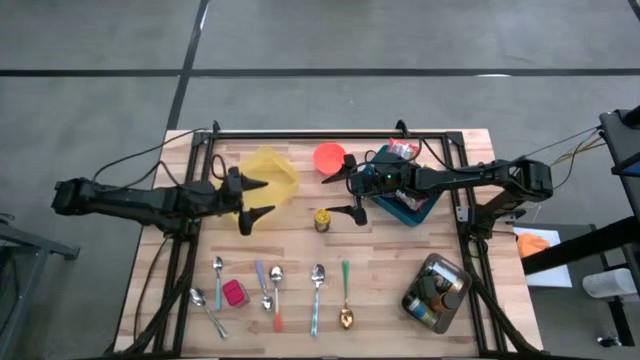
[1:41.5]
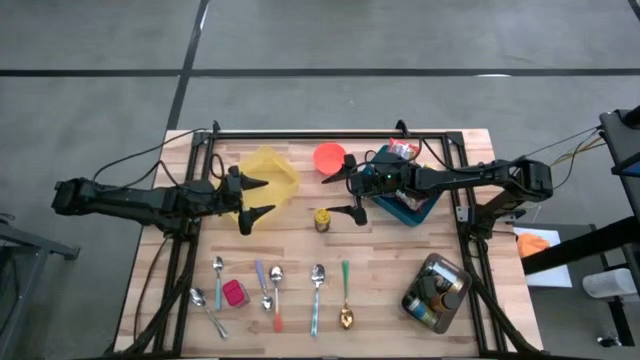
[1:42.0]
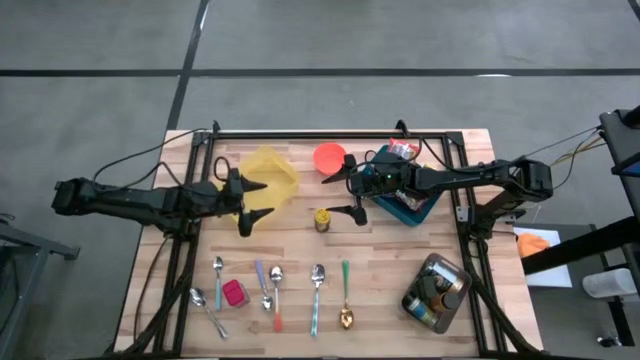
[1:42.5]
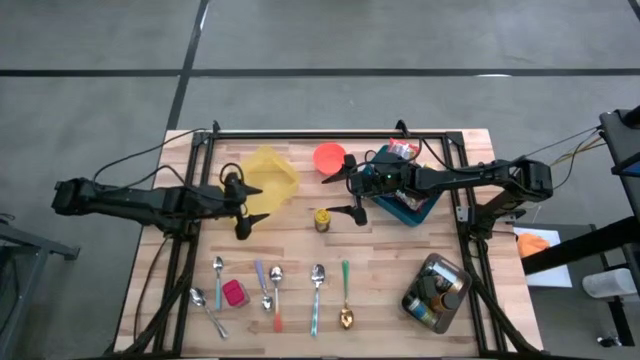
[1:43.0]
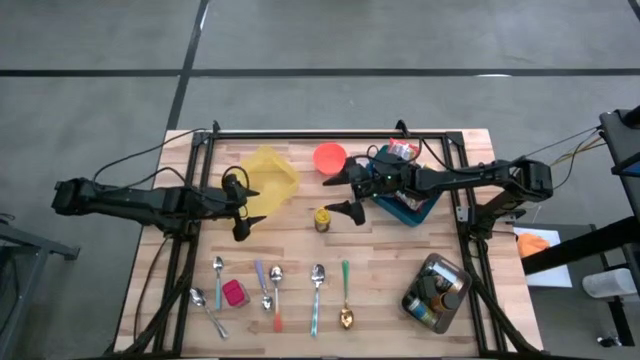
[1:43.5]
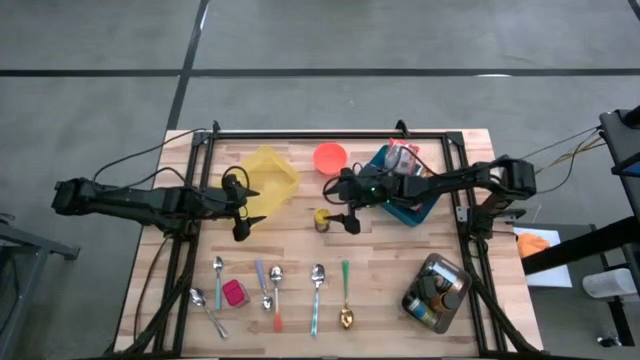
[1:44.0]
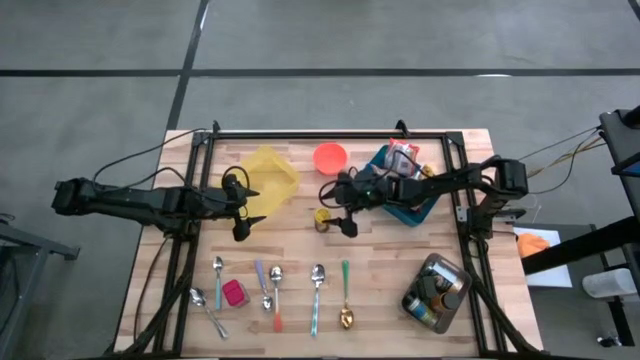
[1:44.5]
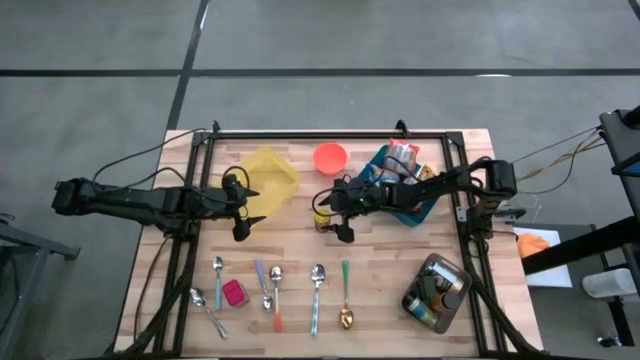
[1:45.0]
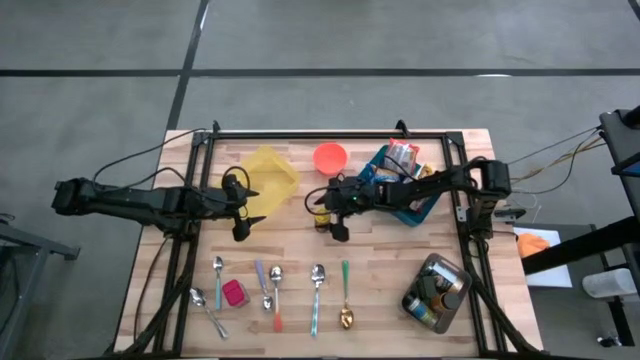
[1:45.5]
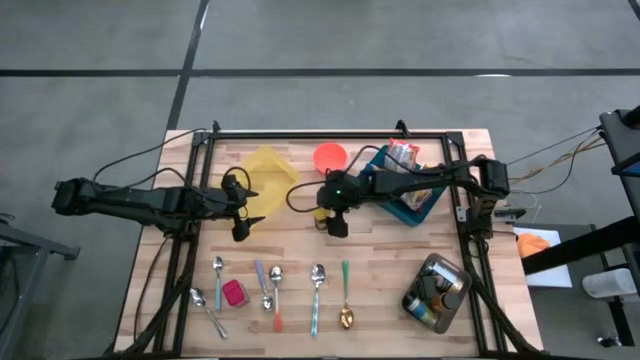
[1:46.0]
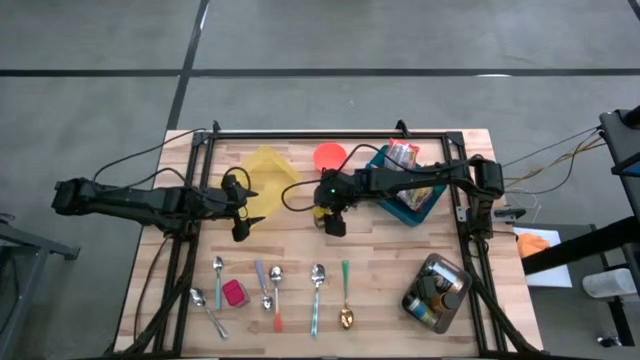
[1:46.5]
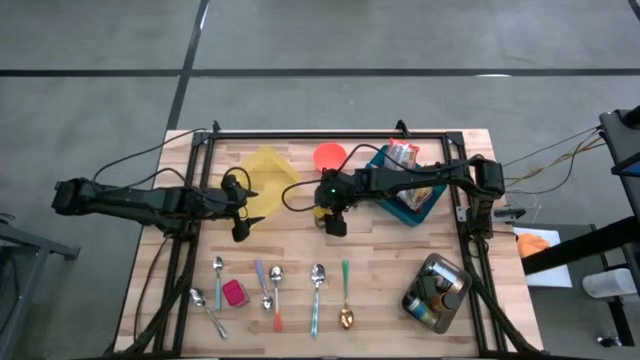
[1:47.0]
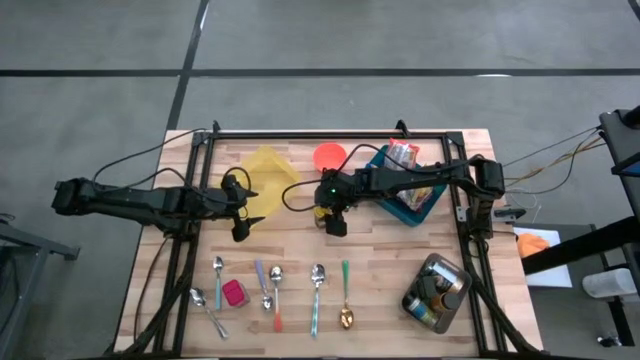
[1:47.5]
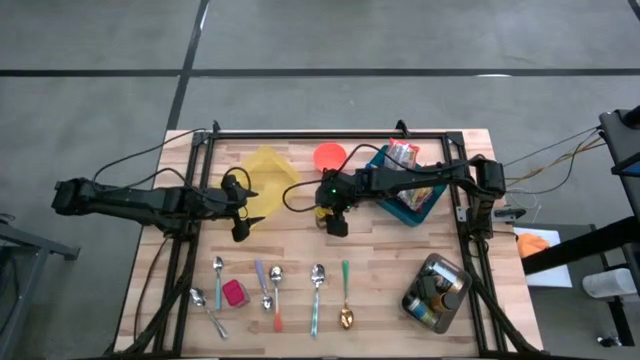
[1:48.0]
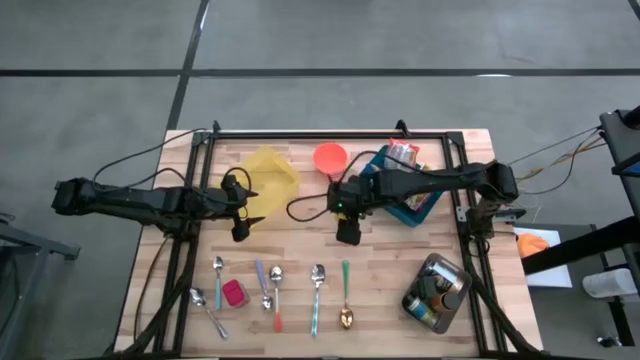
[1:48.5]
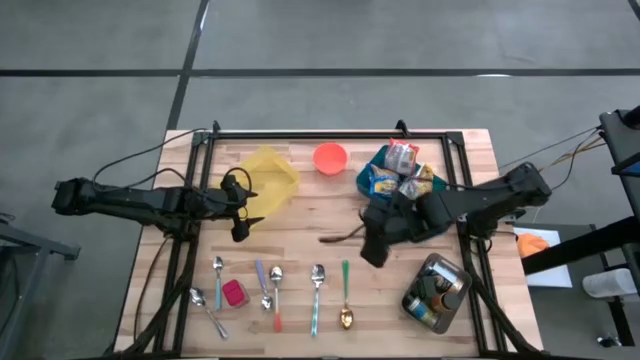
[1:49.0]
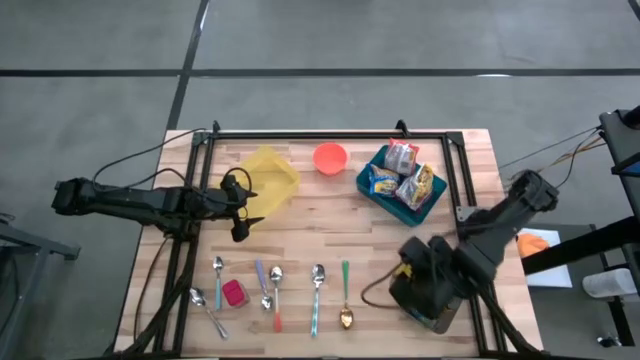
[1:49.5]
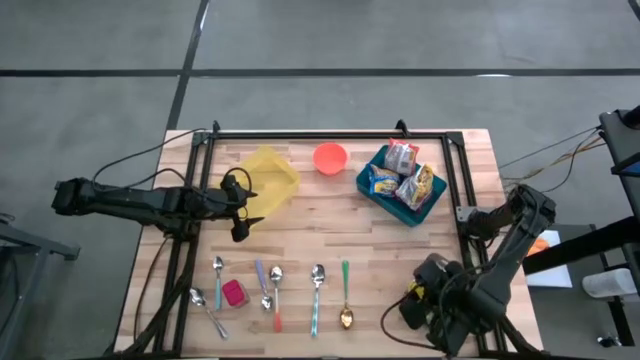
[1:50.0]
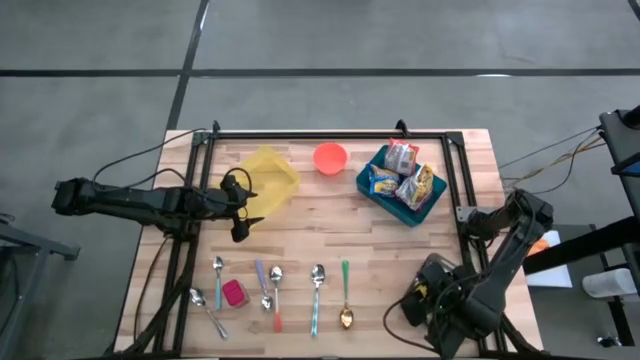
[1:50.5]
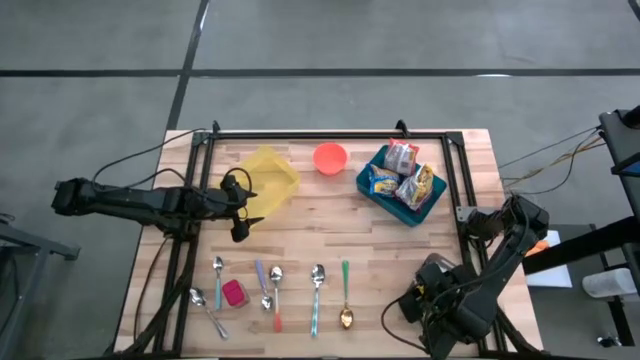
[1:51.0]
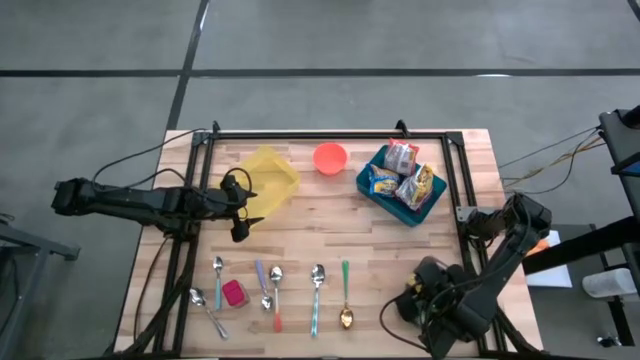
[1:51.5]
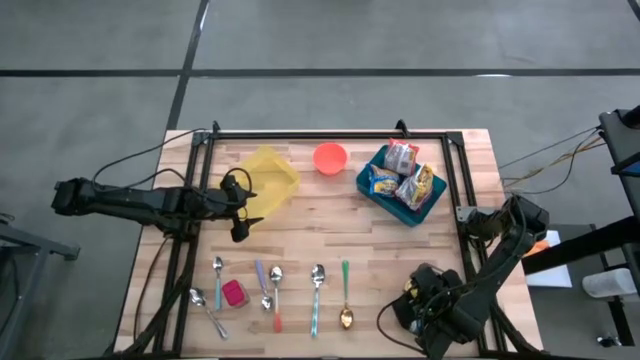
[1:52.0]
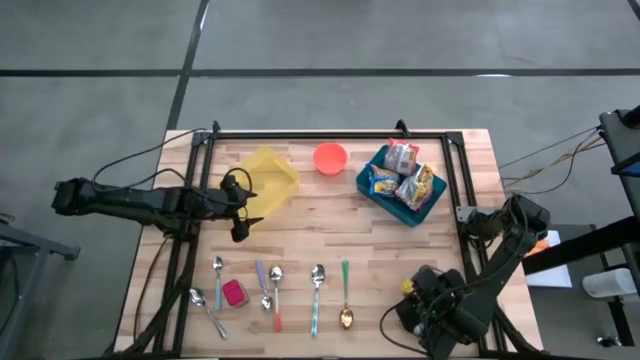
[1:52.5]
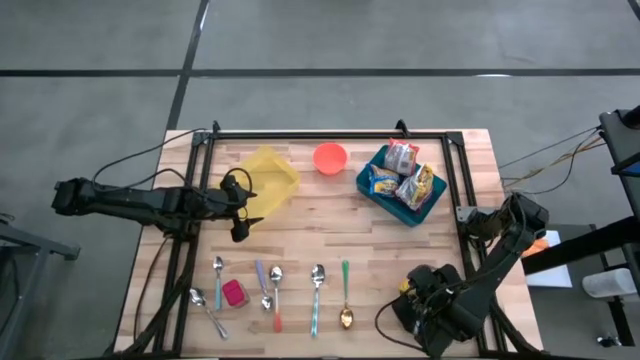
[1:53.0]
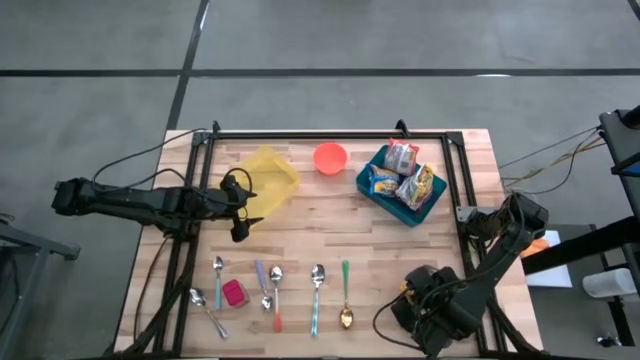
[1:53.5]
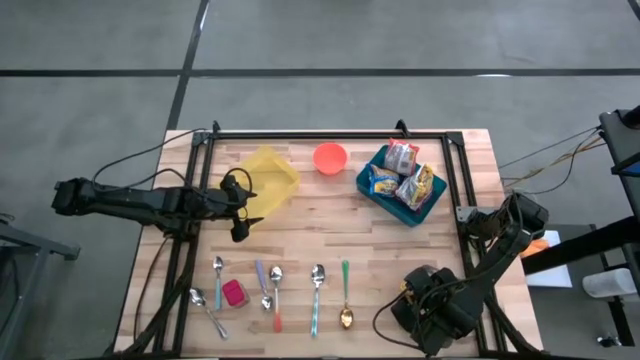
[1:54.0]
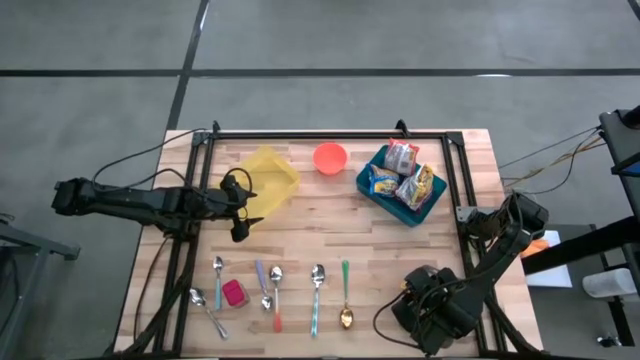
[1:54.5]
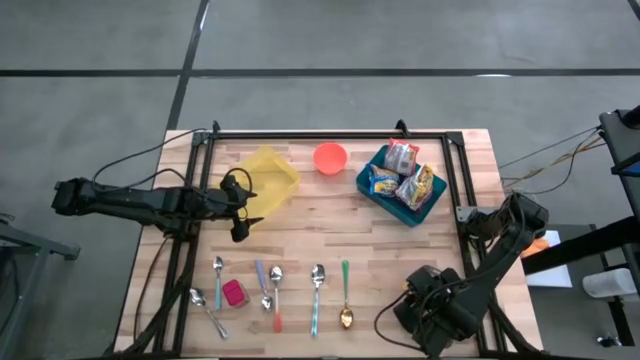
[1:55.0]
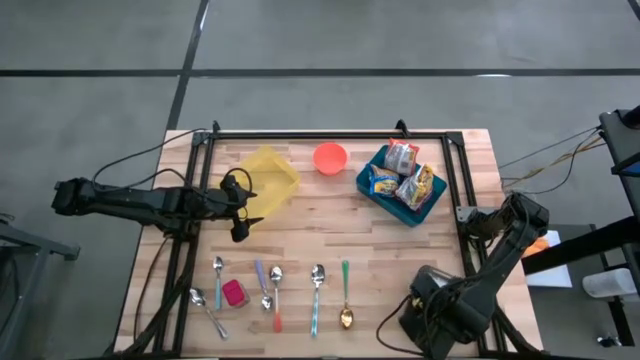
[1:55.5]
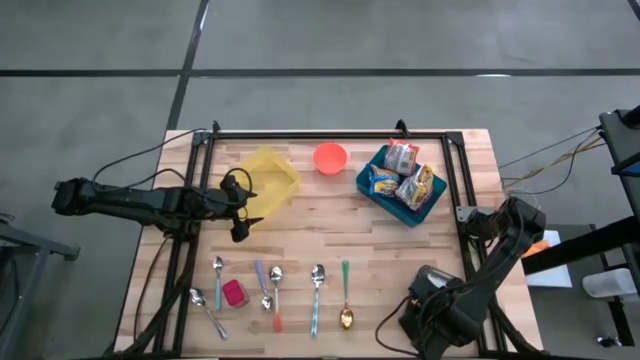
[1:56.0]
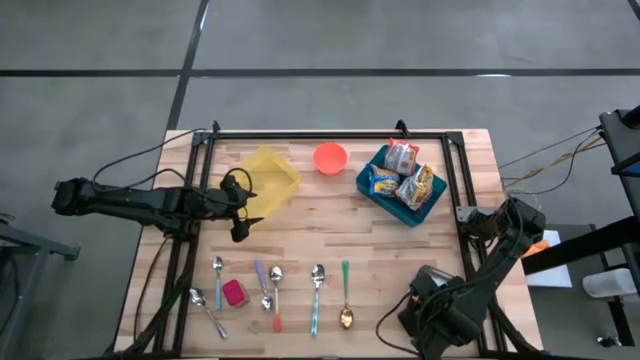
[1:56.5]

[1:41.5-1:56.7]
Put the yellow seasoning bottle into the black bin

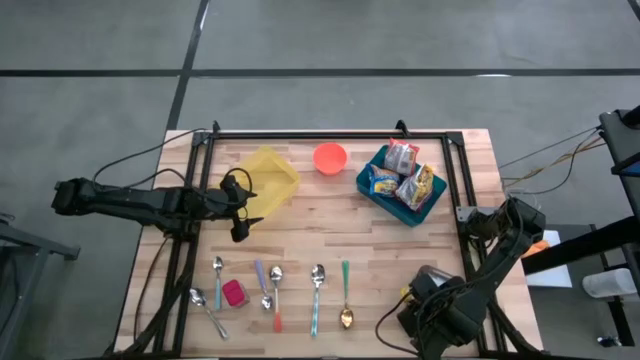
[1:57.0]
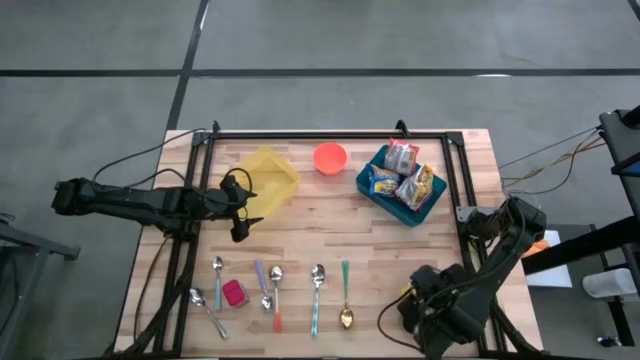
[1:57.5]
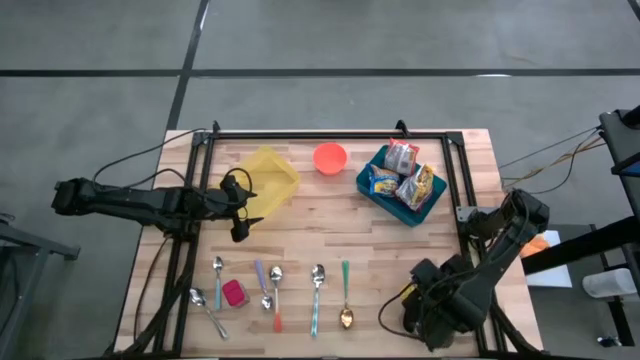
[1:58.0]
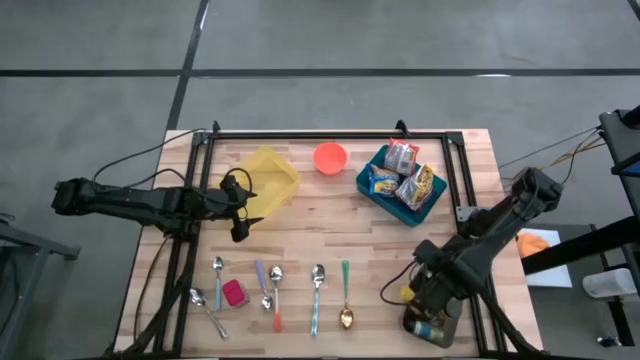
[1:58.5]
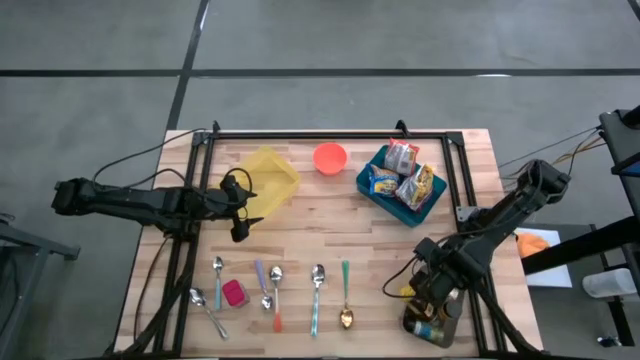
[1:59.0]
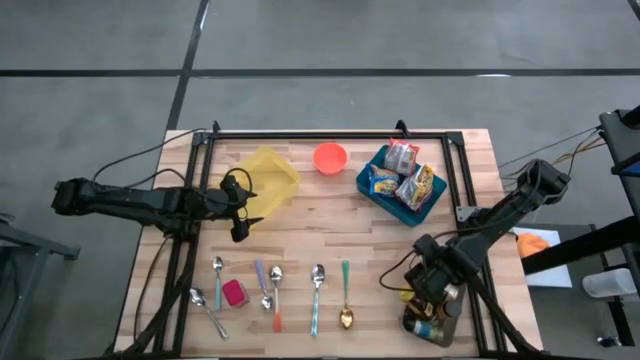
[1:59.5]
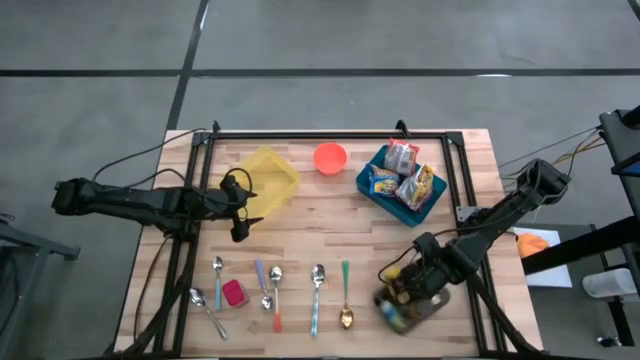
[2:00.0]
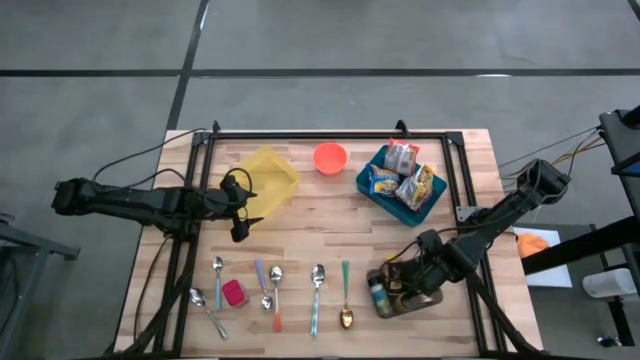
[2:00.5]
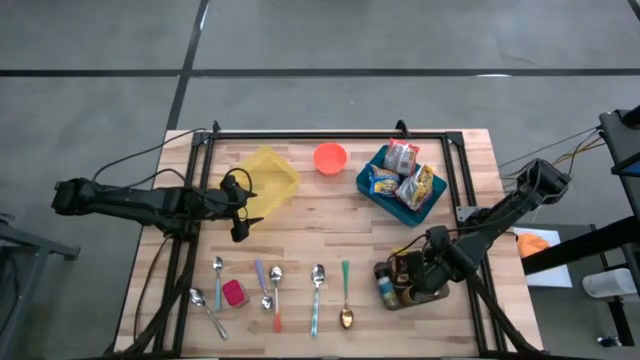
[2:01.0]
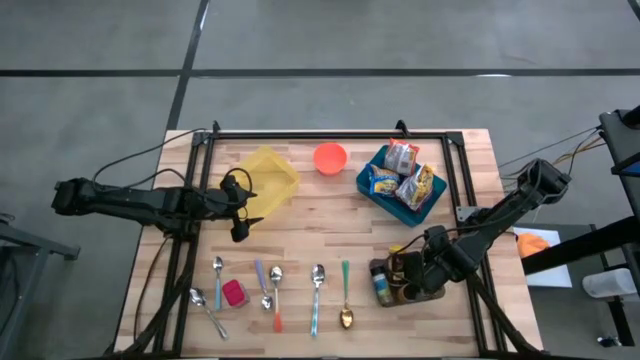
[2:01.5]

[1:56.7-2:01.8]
Adjust the black bin
